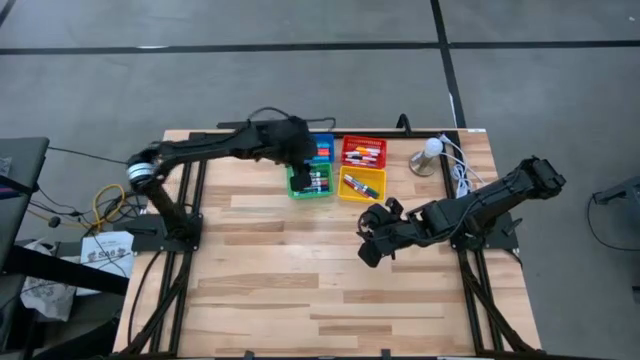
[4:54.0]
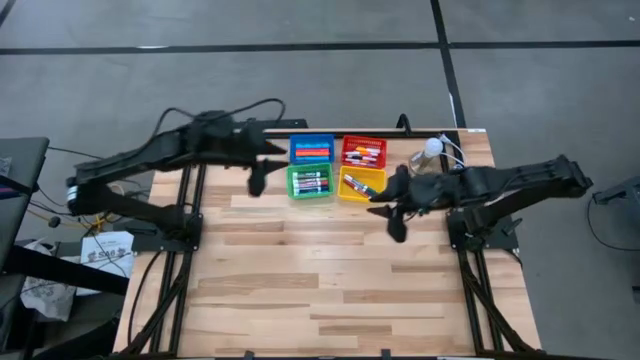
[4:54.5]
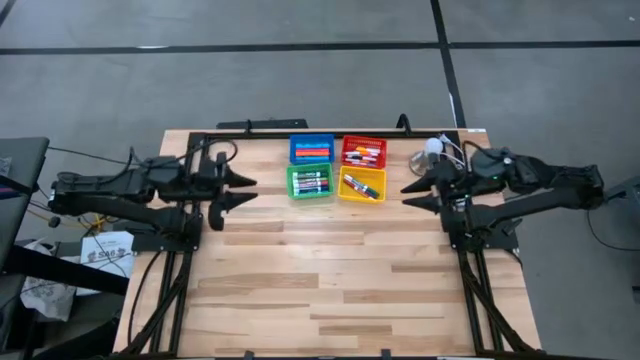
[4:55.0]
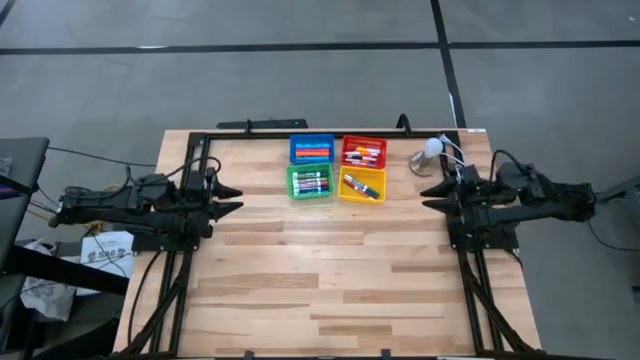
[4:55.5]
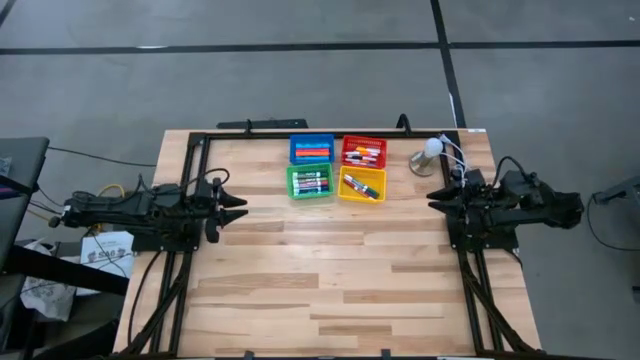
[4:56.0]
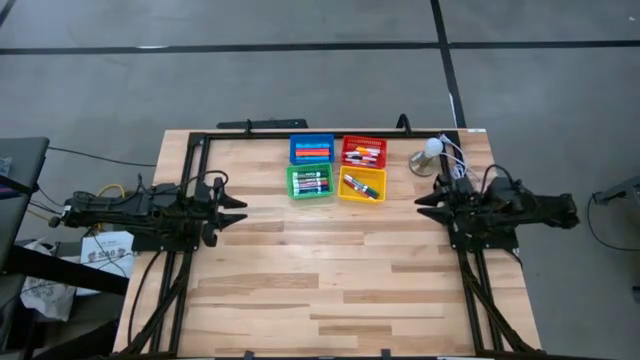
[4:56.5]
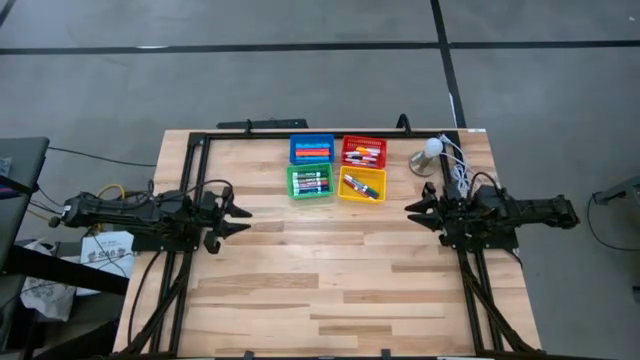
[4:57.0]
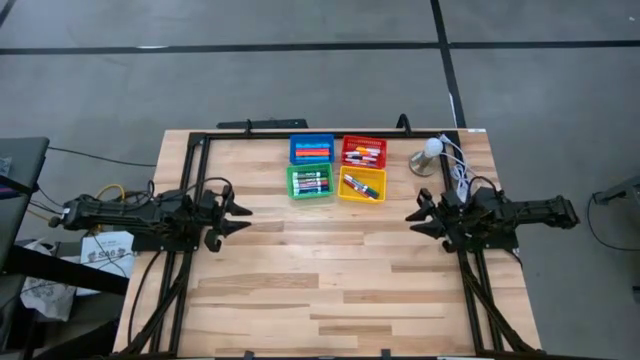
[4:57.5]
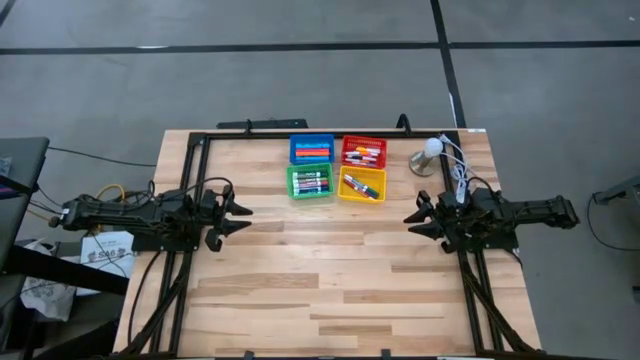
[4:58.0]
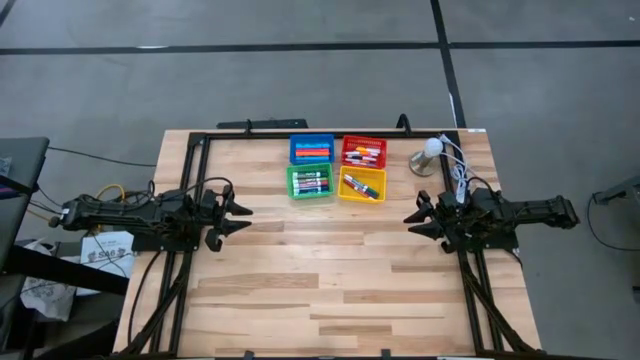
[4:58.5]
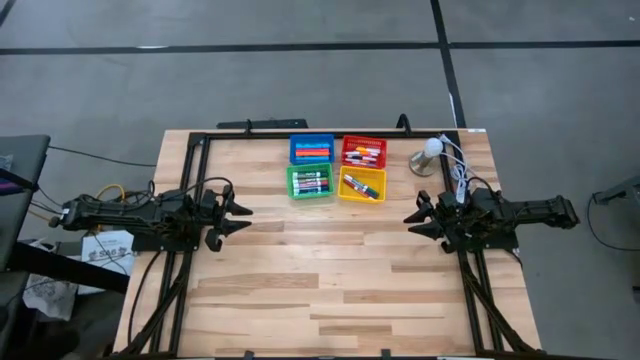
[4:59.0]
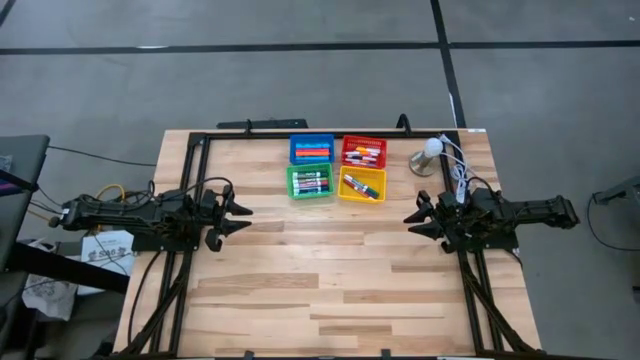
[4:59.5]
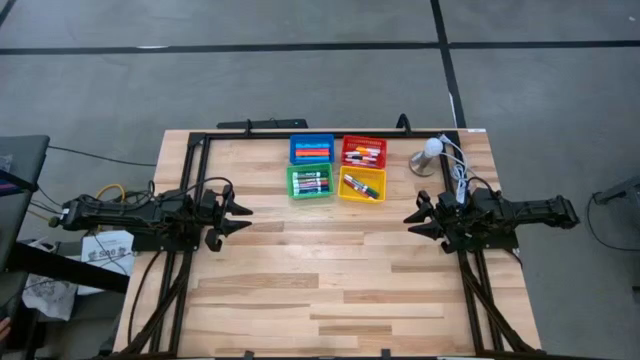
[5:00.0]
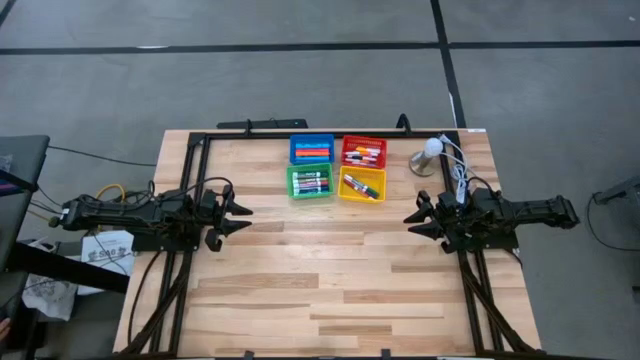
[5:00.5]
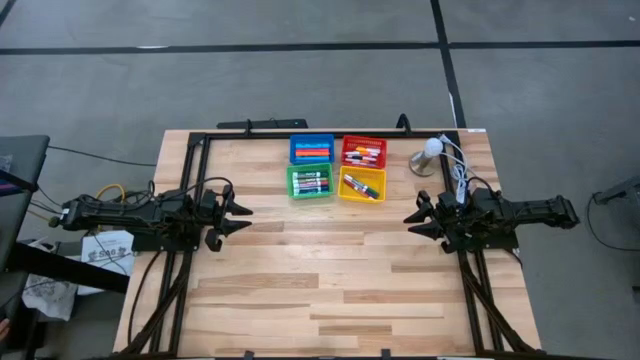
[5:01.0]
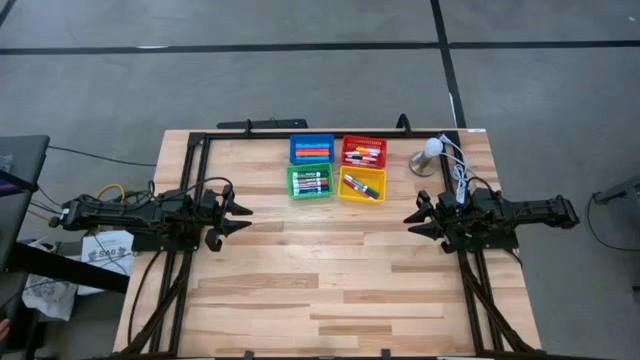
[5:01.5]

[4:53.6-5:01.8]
Task: Pick & Place Markers
Return to Home Position

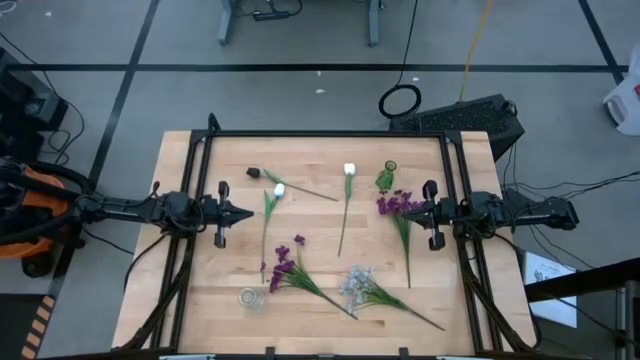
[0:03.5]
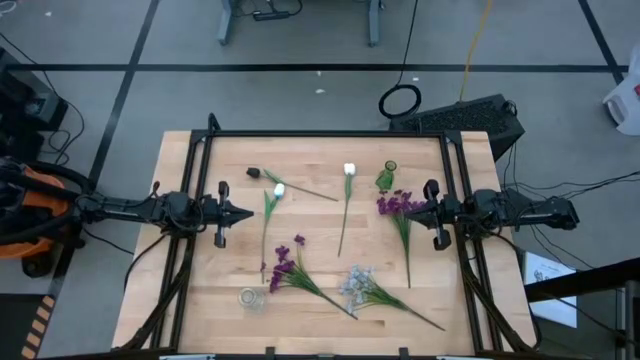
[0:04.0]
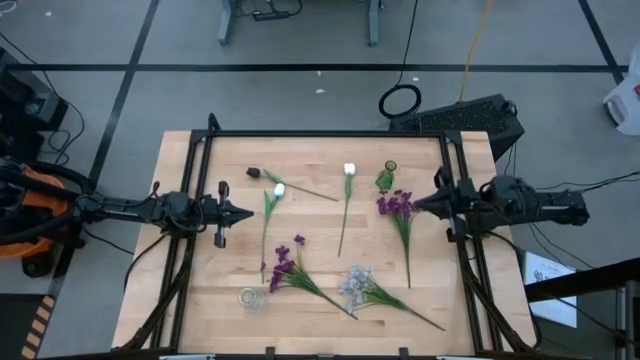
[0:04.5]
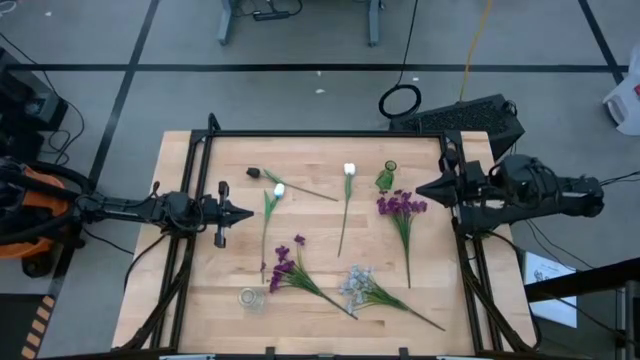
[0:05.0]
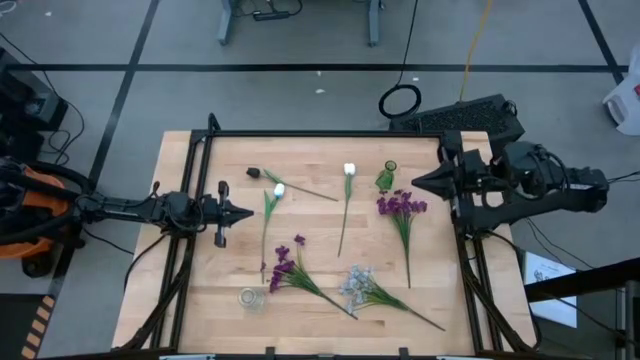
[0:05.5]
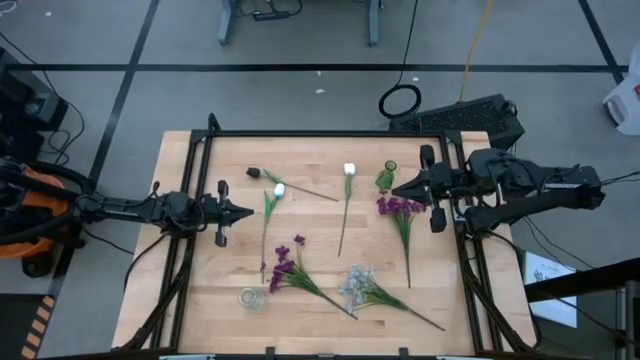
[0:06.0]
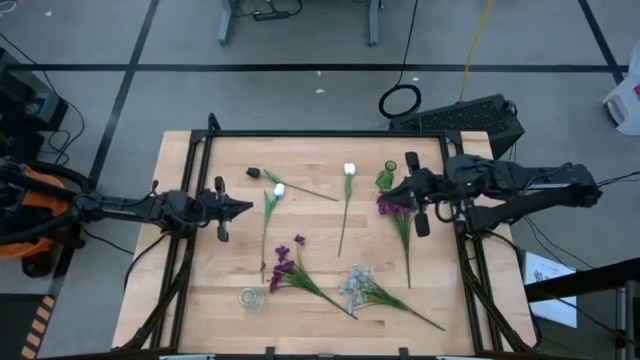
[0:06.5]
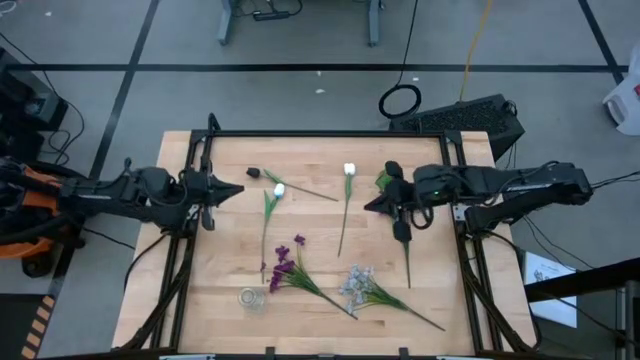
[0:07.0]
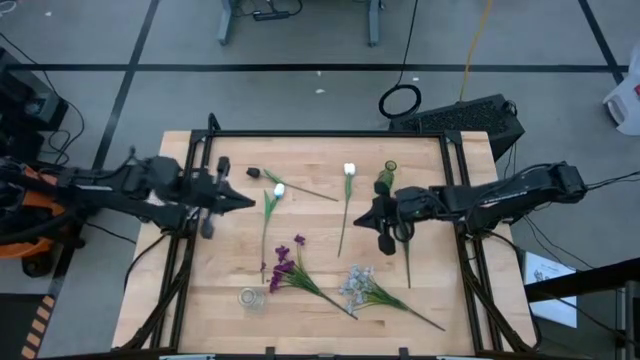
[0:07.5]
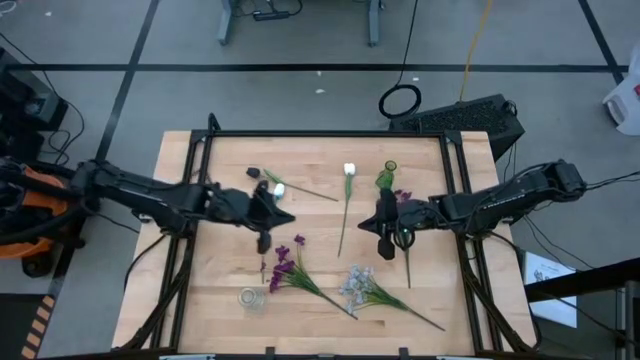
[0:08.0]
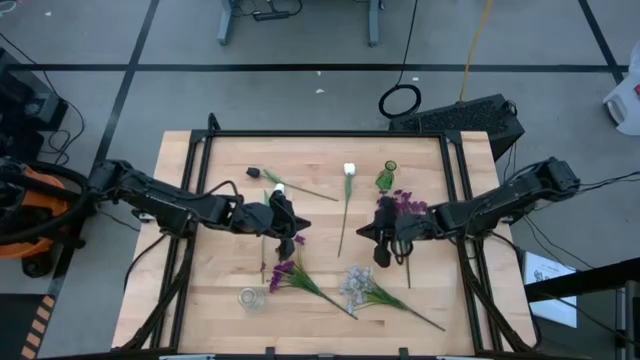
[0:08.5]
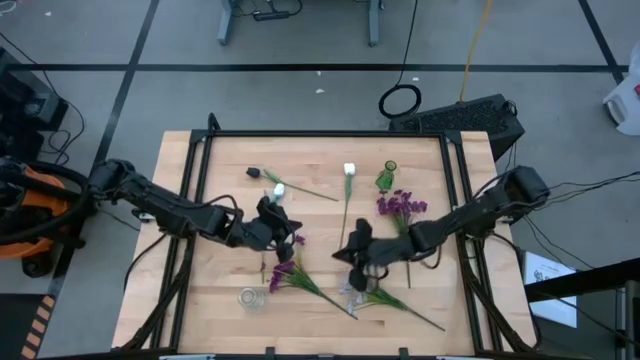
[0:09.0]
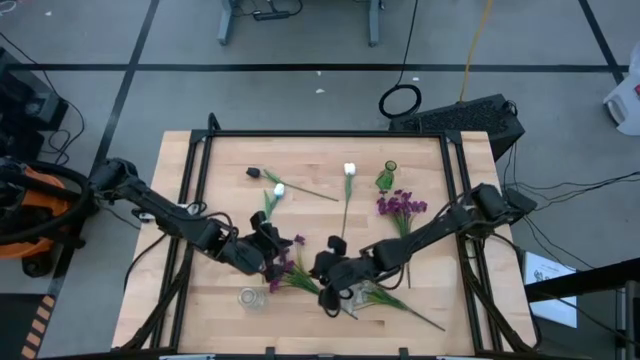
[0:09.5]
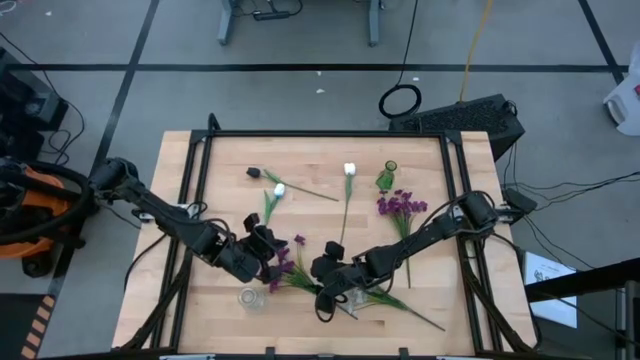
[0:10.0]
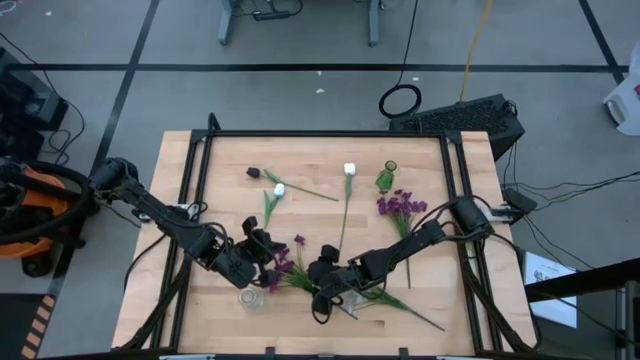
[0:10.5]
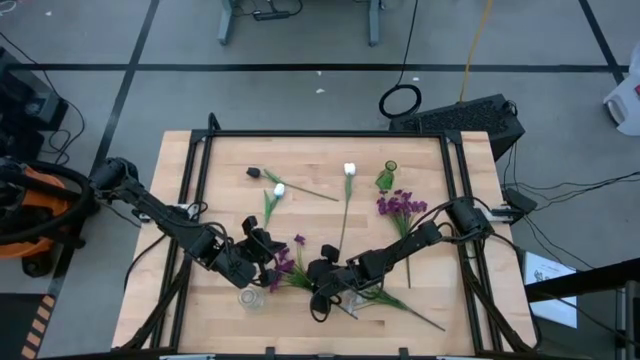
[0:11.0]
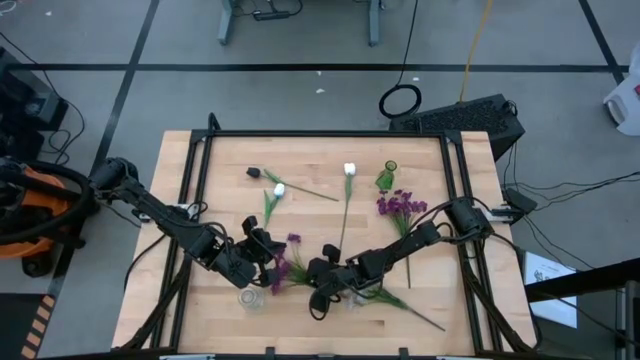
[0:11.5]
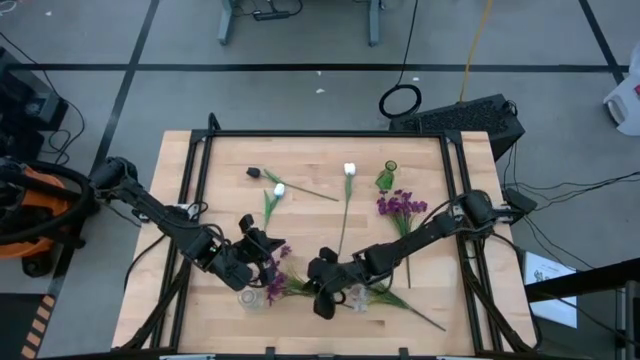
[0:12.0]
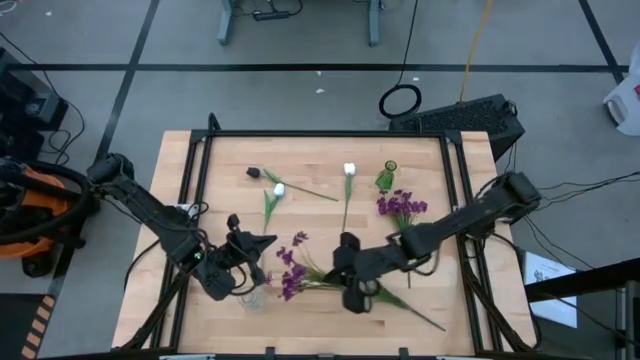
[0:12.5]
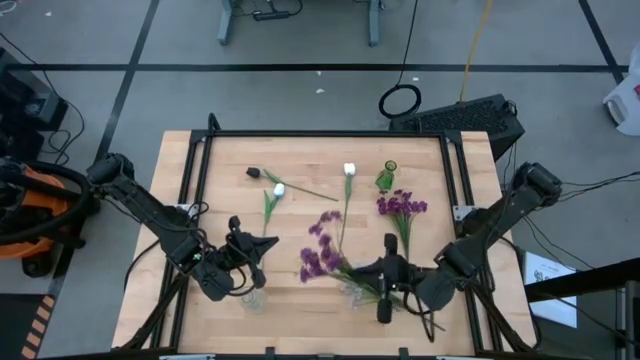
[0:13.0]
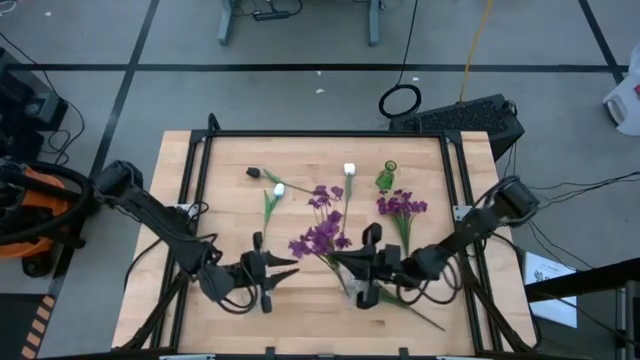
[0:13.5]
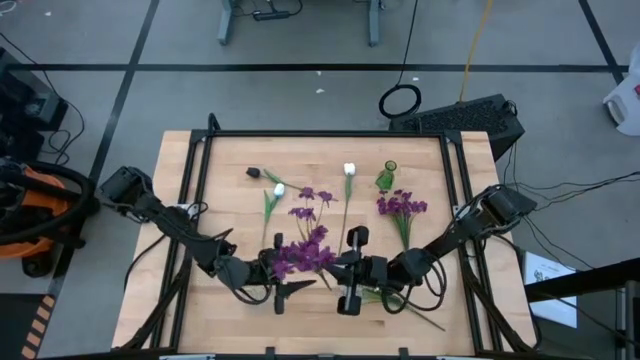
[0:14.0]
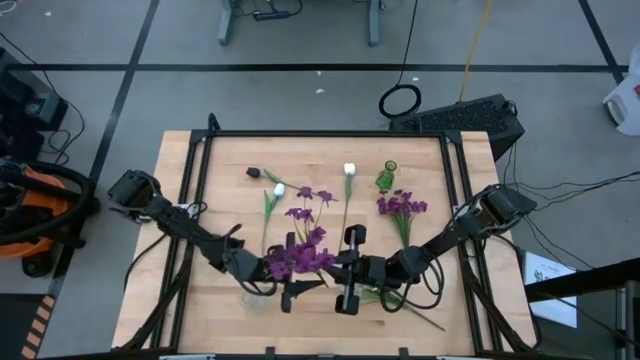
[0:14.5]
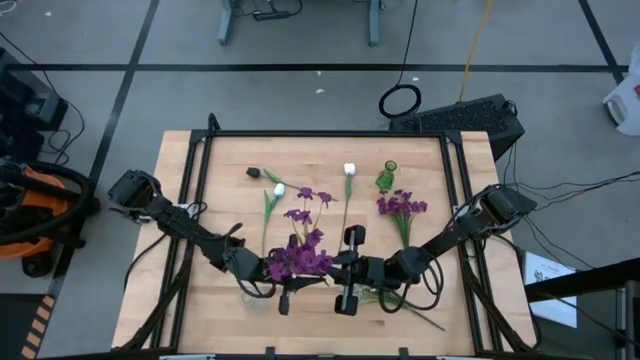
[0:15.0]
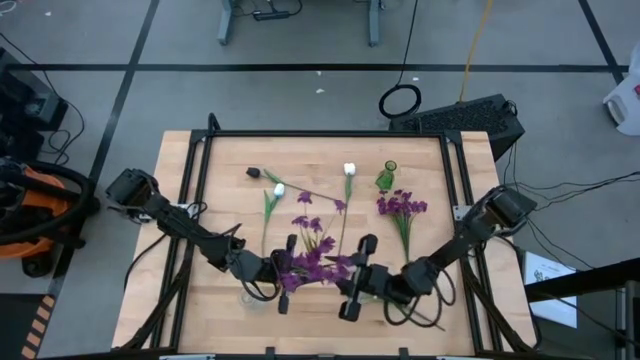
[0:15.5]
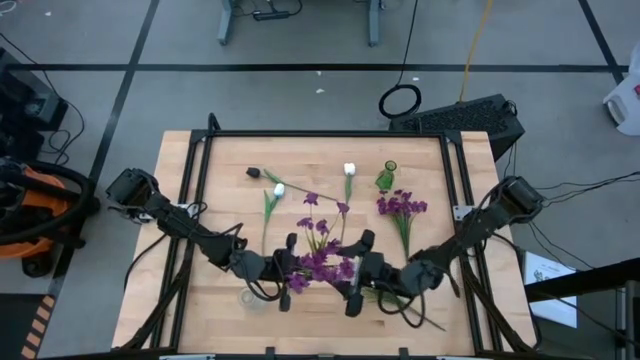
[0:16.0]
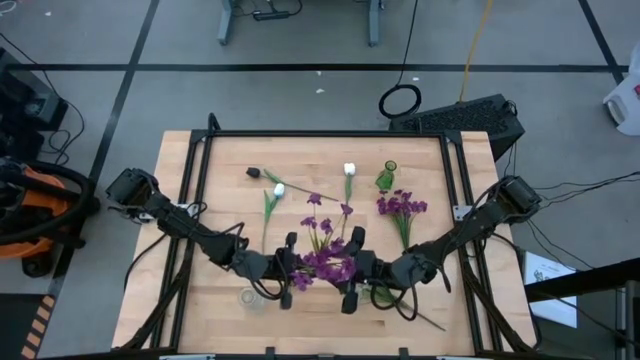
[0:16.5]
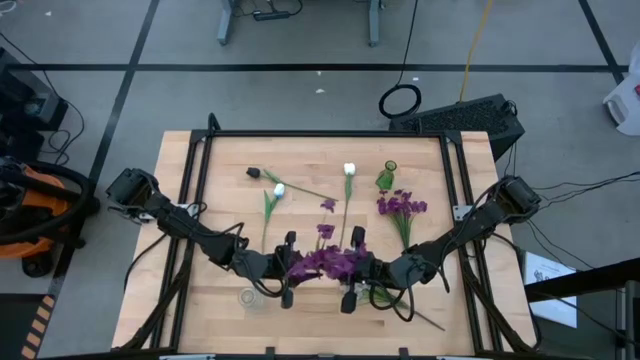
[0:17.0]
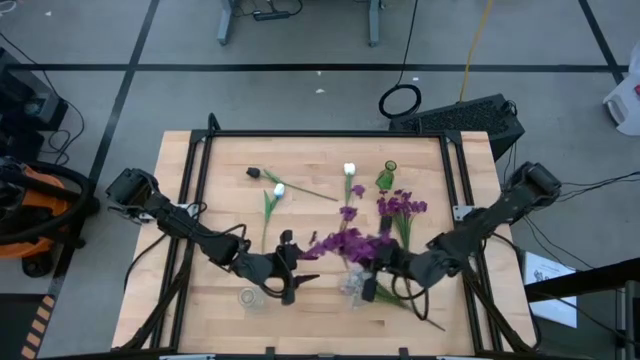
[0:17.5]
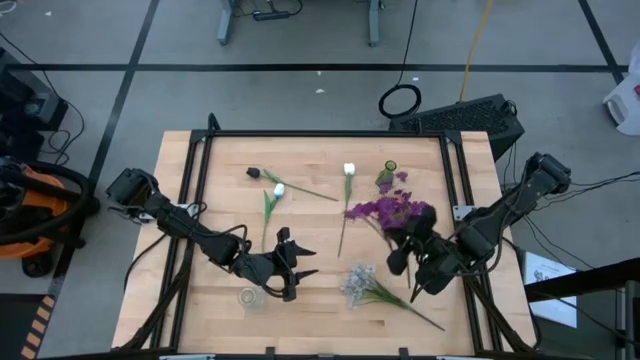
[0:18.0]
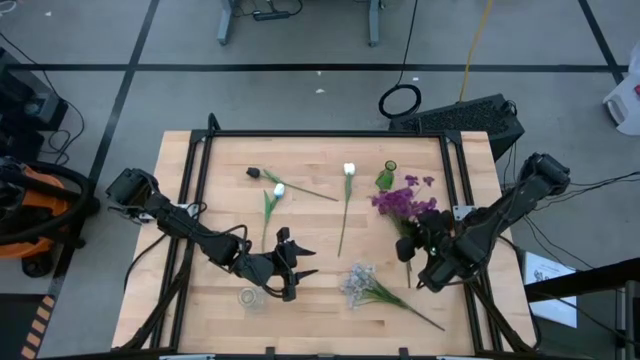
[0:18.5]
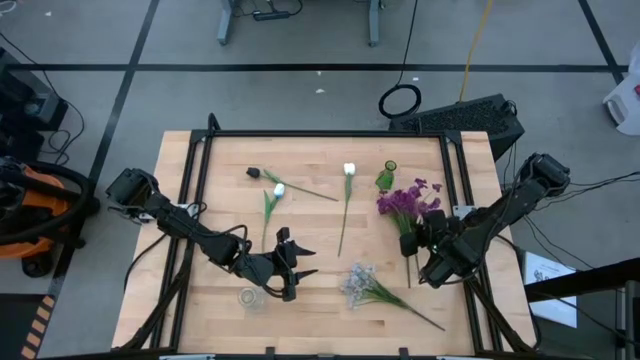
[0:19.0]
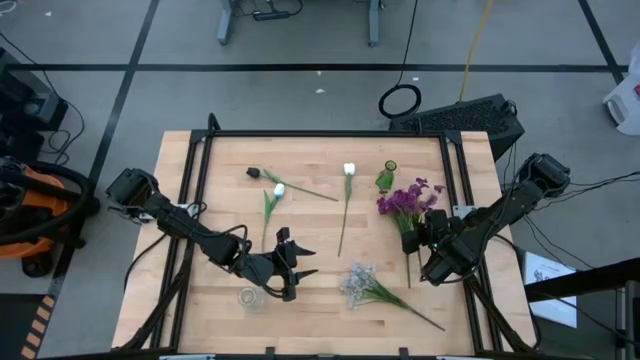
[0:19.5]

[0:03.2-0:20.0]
Task: Sort flowers into vase by color
Move the left violet flower to the middle right of the table
